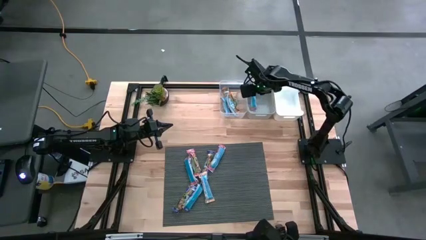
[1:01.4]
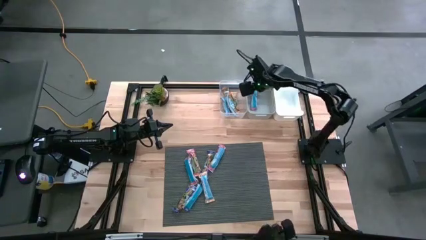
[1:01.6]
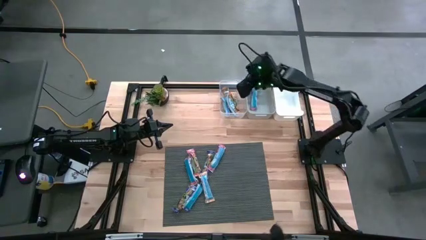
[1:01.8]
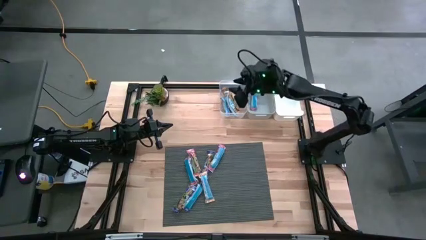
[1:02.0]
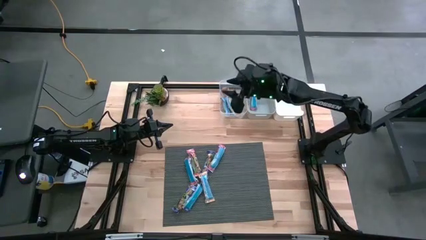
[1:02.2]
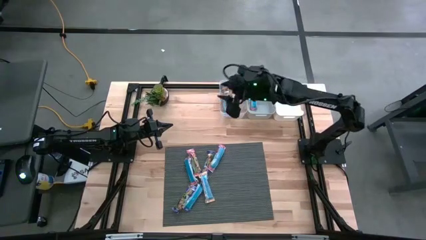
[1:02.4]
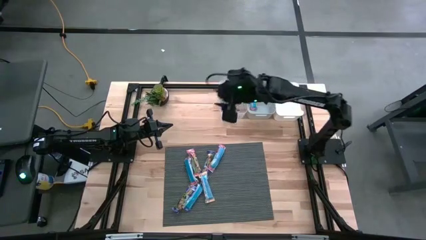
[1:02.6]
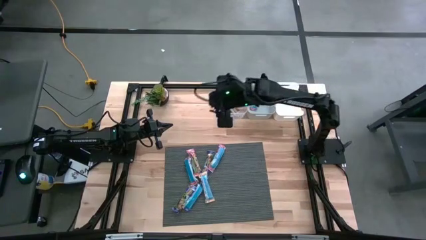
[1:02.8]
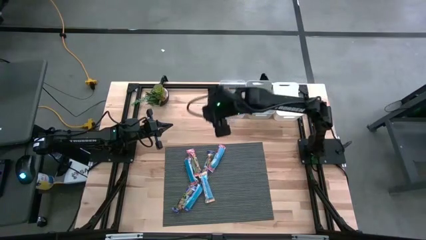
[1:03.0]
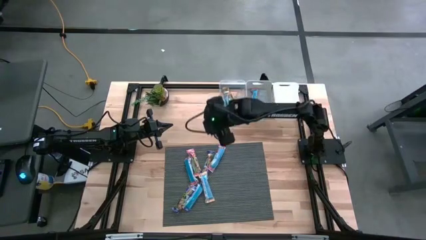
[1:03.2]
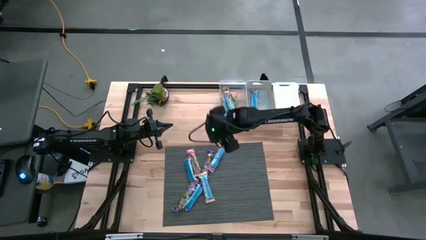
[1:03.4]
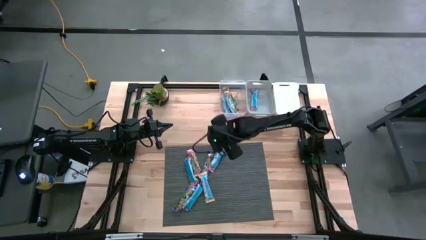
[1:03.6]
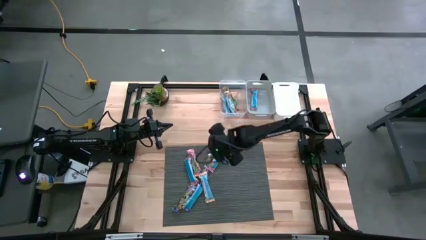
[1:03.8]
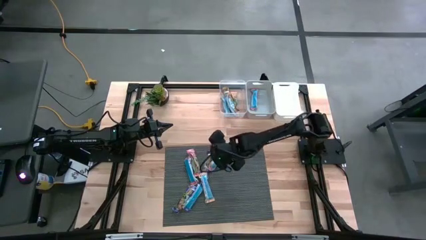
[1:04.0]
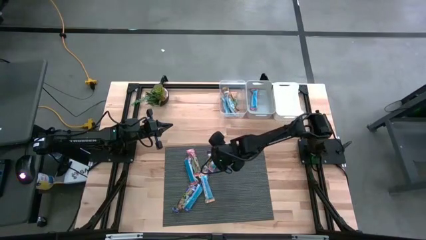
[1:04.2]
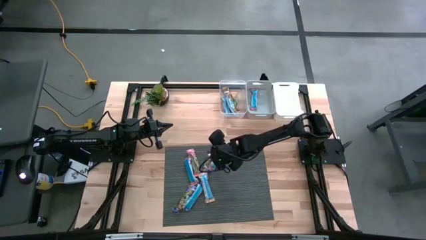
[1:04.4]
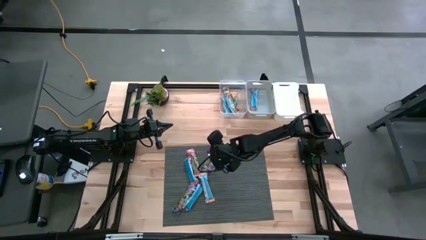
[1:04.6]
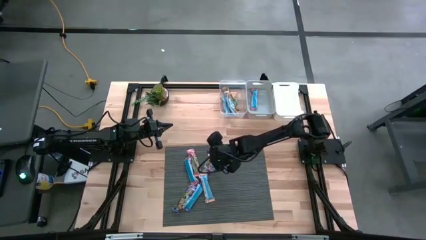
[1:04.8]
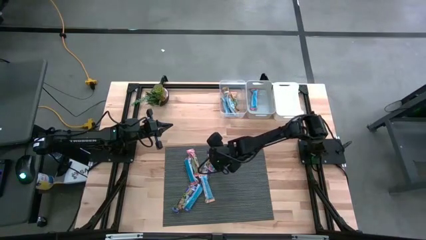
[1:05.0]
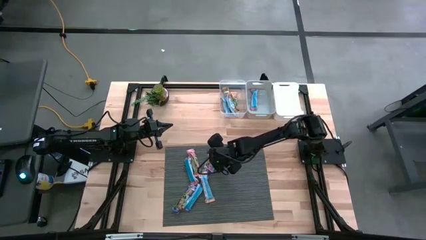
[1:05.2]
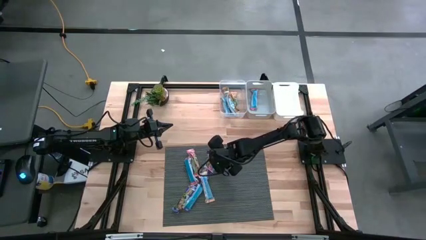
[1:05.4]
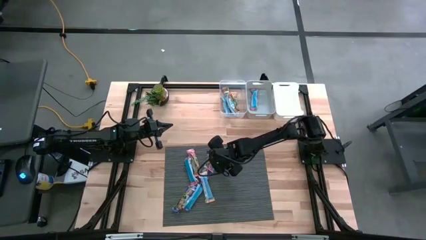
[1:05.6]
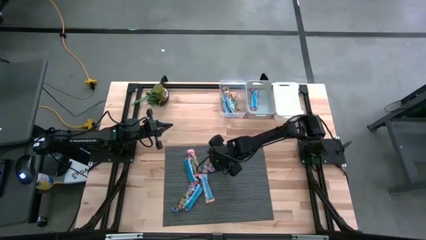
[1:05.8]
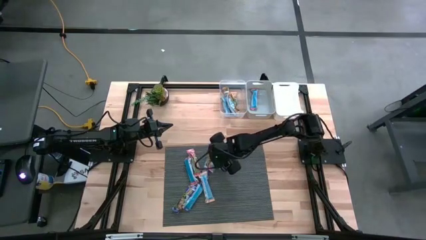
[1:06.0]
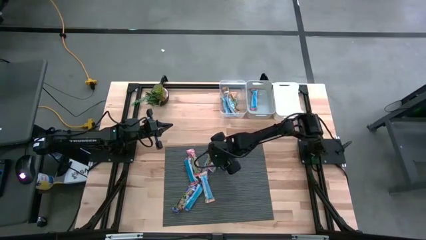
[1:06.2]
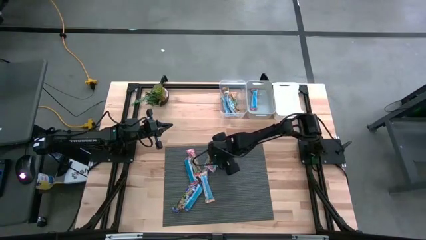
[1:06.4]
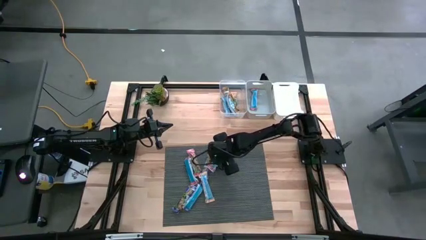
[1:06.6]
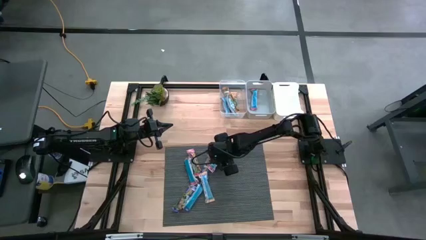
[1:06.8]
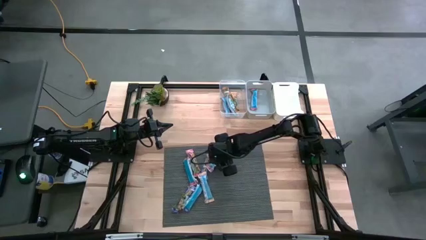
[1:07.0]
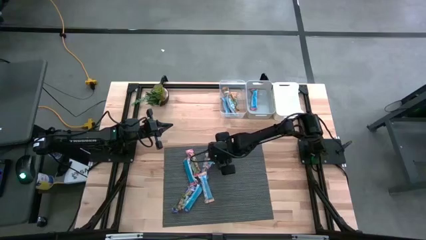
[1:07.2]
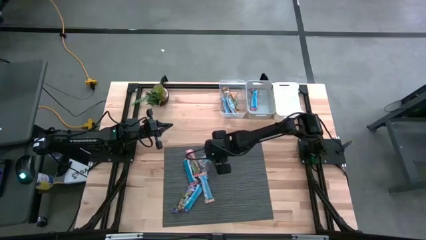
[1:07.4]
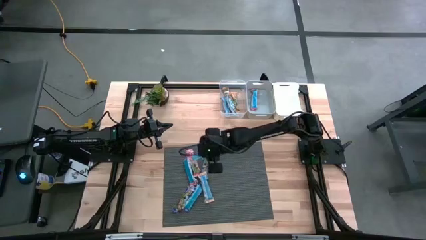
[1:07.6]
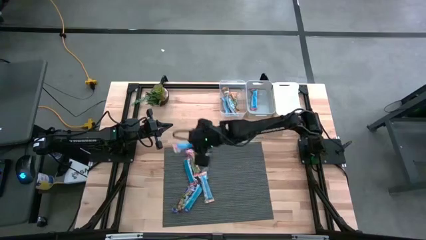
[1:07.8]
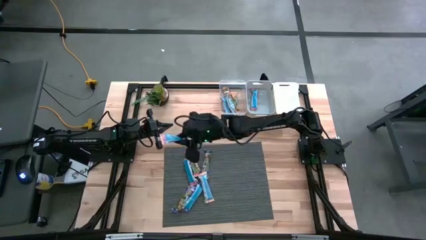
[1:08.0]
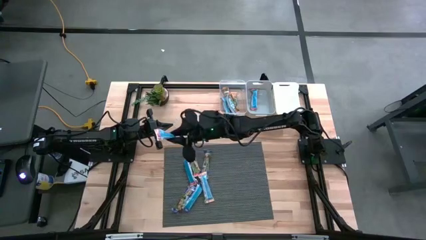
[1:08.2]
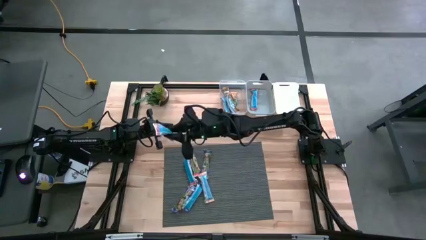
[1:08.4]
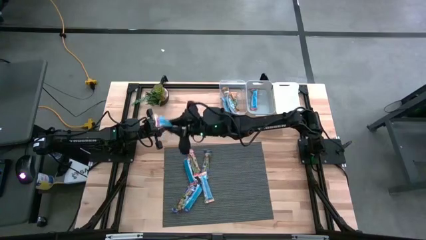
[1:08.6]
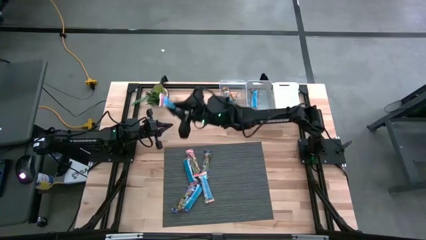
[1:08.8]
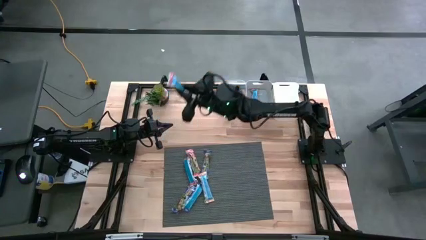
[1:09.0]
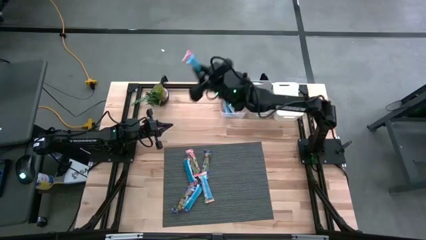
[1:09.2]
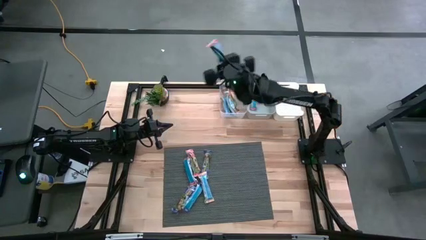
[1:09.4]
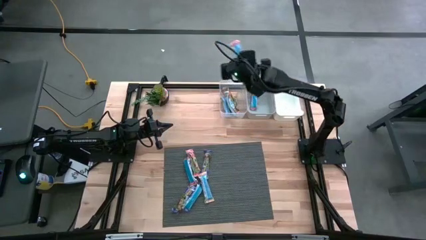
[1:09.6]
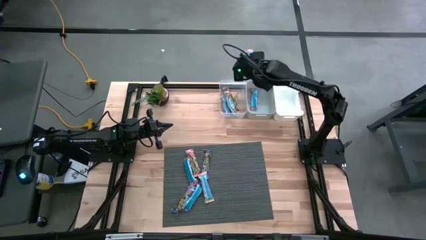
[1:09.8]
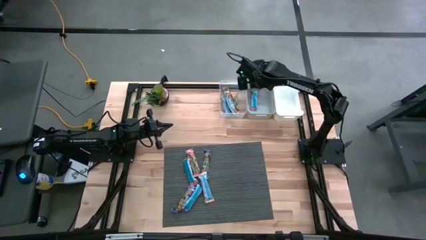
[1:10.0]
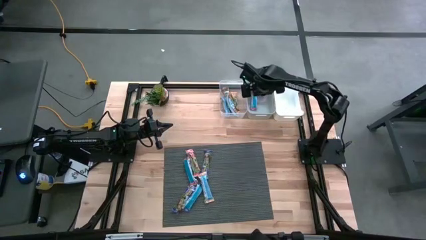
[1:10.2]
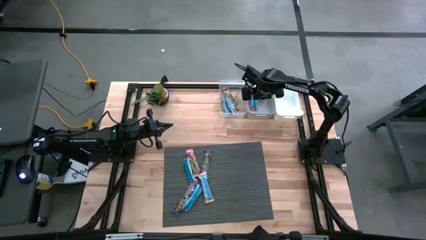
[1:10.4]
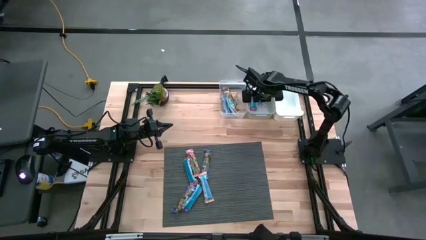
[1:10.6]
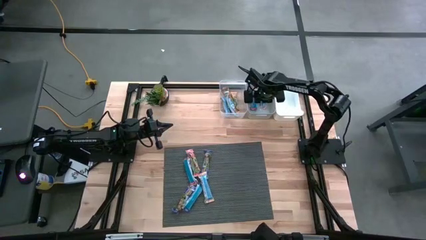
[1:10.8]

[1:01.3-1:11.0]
Task: Pick and place Granola Bars by type
Put the red granola bar into the gray bin

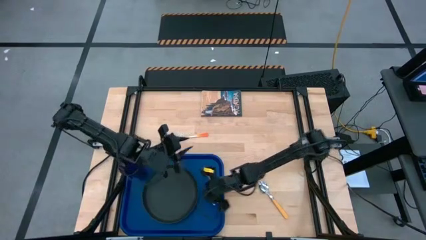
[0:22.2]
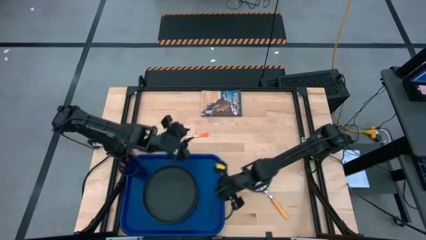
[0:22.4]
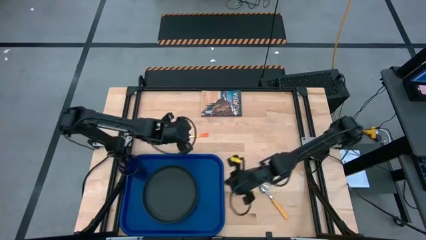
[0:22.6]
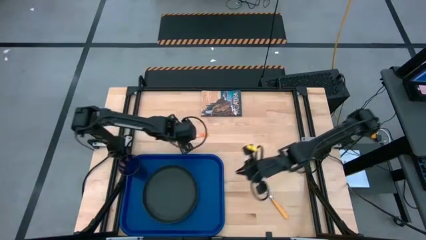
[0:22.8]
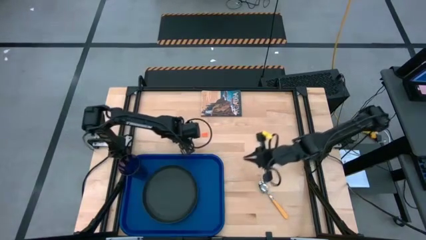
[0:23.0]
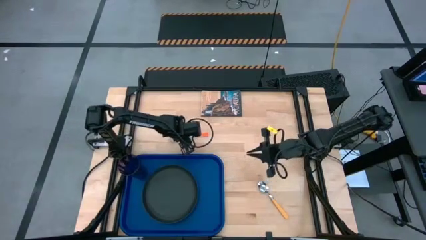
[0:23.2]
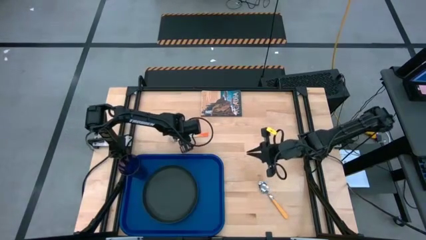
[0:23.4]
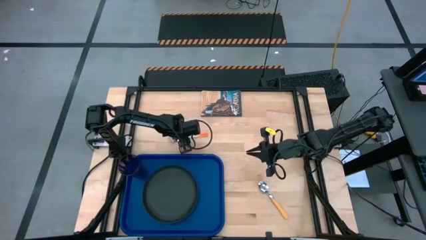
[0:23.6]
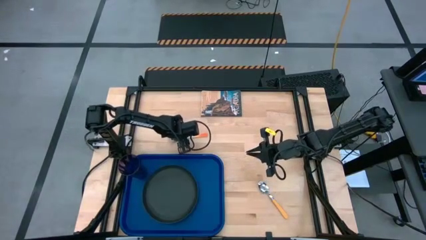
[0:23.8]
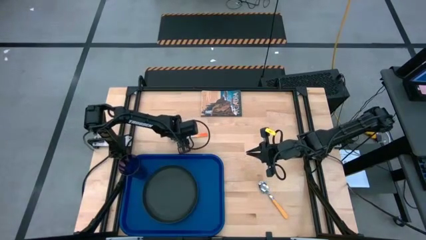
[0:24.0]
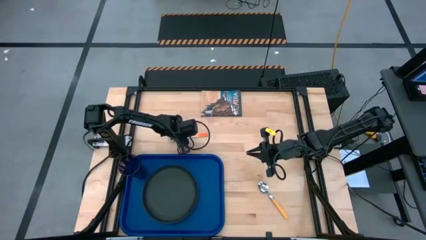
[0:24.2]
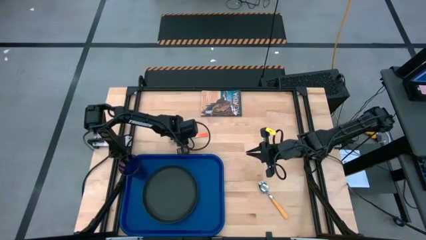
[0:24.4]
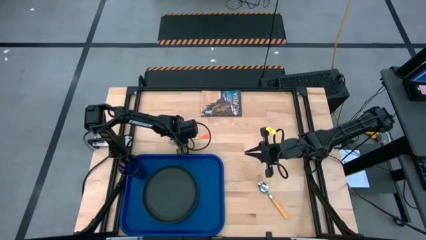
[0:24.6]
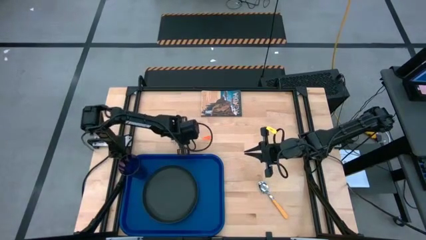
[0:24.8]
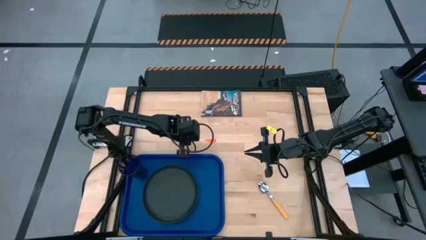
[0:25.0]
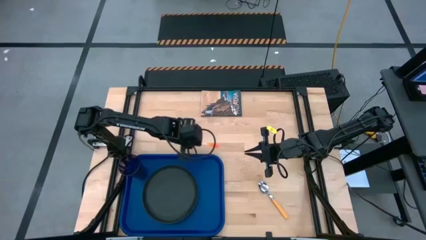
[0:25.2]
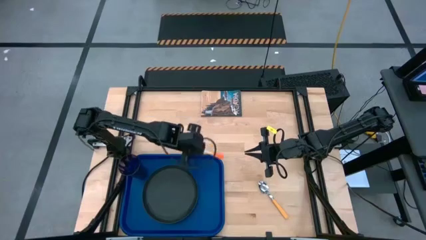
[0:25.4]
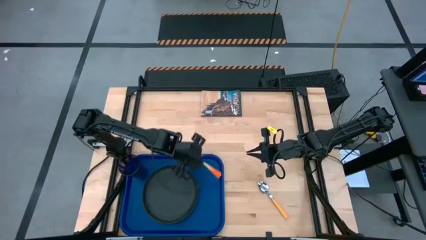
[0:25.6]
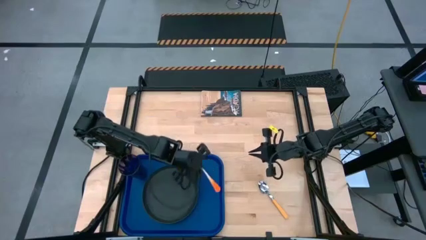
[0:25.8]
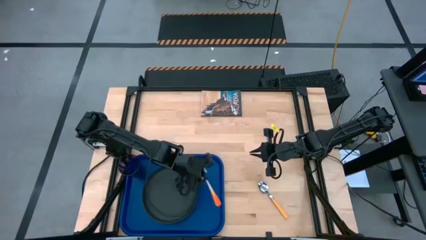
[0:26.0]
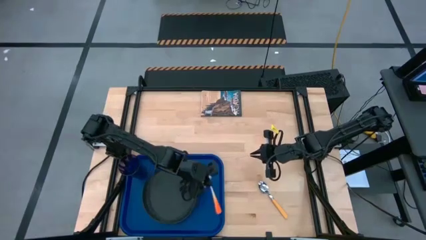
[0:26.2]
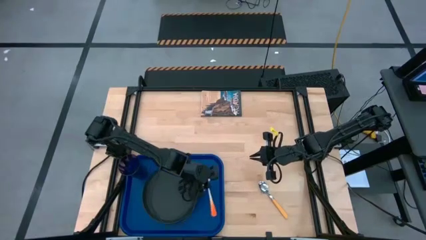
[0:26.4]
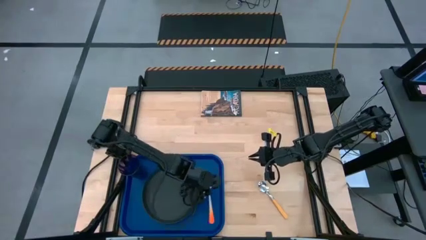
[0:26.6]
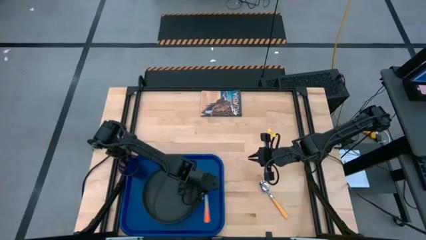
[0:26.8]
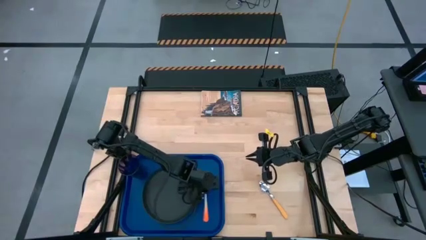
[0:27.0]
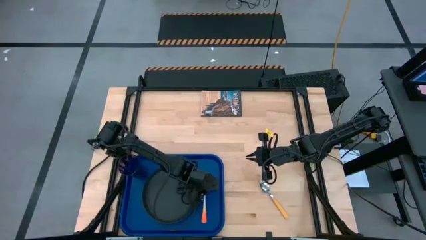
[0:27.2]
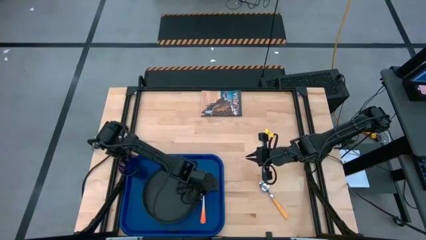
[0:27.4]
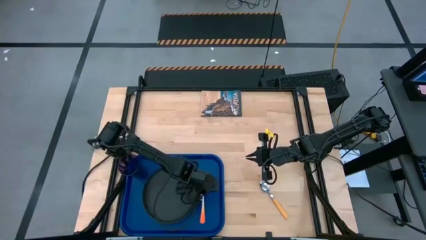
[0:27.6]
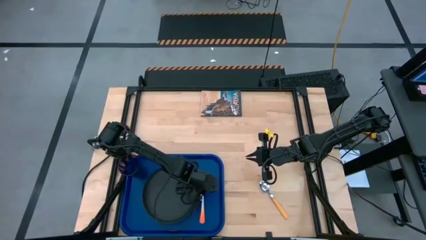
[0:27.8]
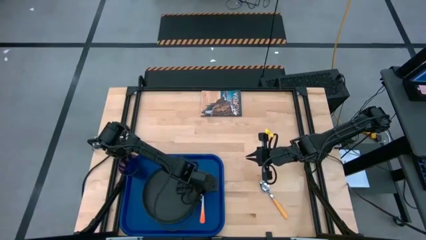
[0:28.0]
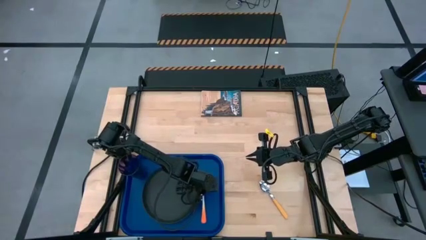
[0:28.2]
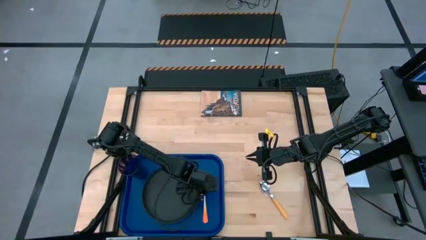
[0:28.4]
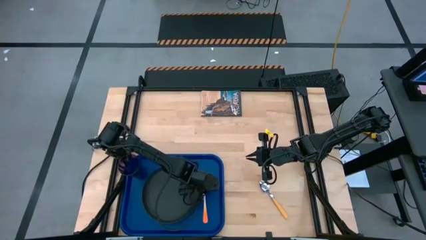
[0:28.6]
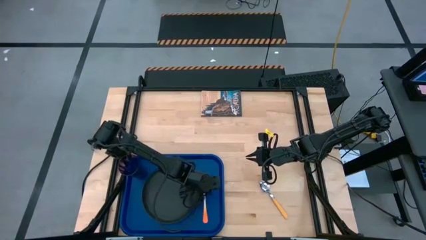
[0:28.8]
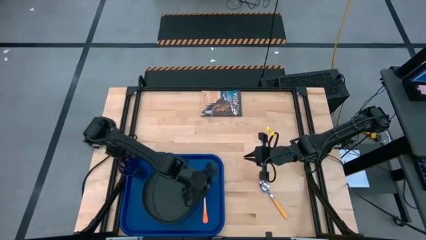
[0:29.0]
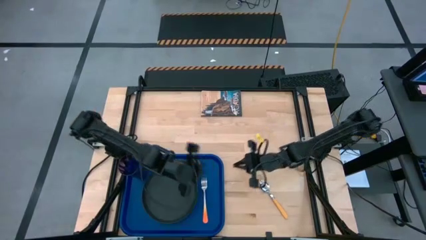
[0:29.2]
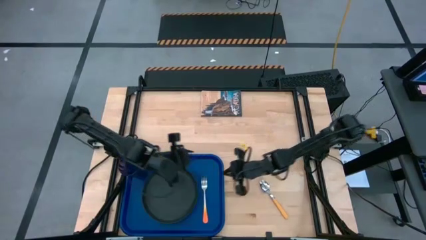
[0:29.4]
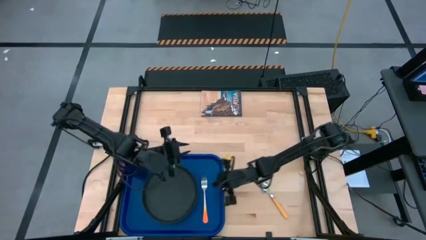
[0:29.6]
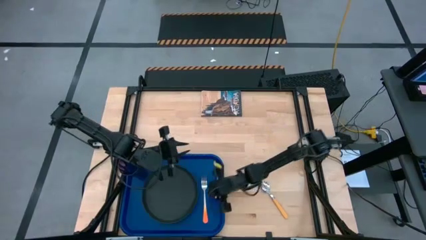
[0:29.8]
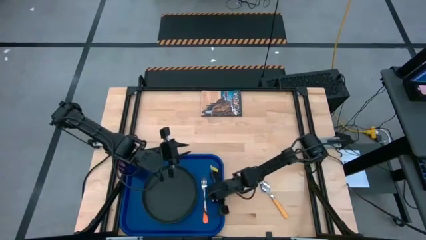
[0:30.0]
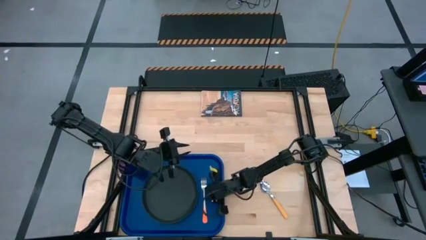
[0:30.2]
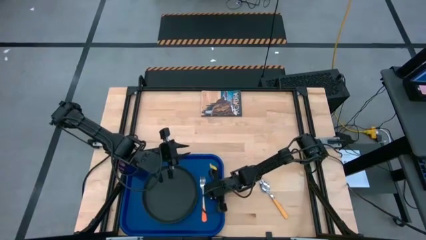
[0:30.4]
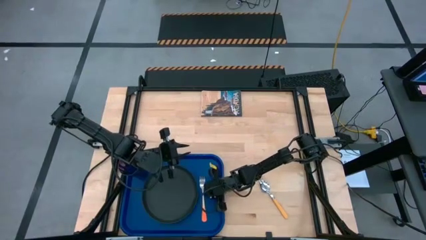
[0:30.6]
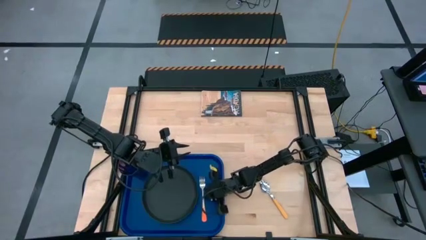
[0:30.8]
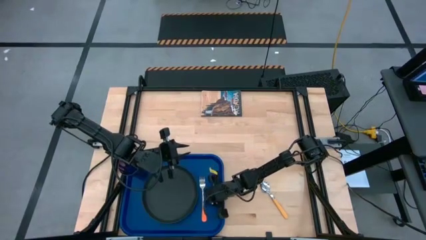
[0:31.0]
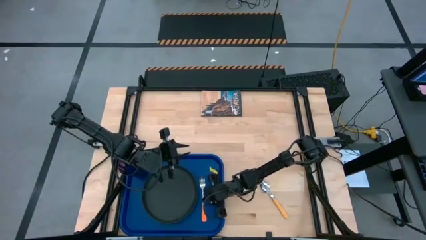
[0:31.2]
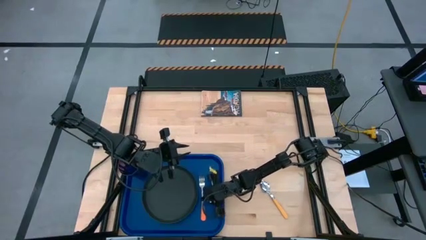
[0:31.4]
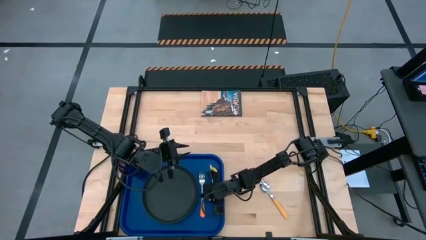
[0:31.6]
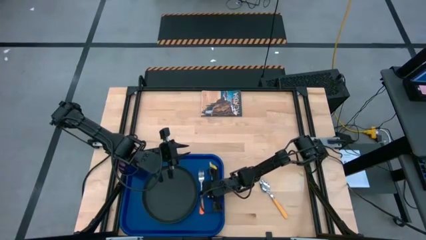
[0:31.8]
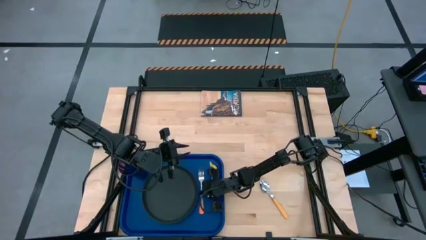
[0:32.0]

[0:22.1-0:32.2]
Task: Pick and place plate/cup/fork/spoon on tray
Put the orange fork on the blue serving tray to the right of the black plate
